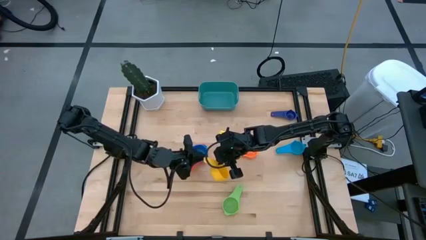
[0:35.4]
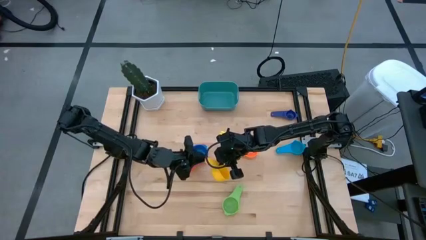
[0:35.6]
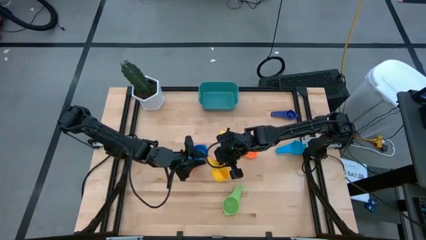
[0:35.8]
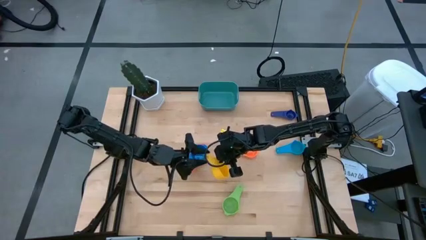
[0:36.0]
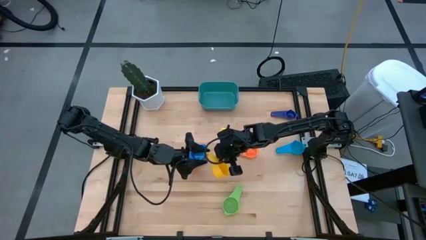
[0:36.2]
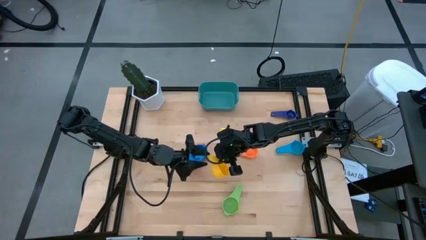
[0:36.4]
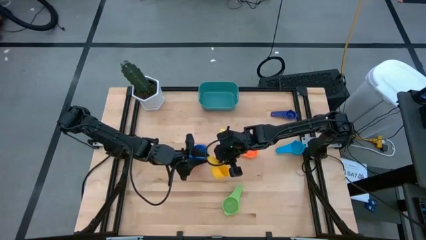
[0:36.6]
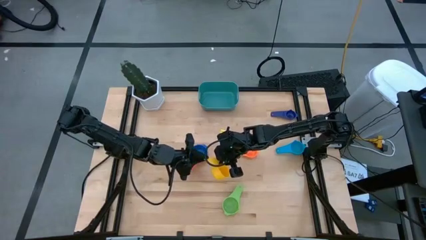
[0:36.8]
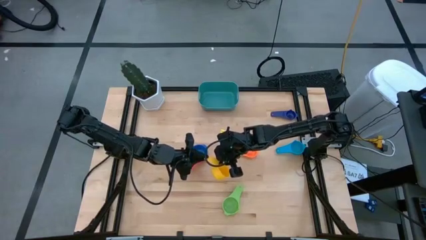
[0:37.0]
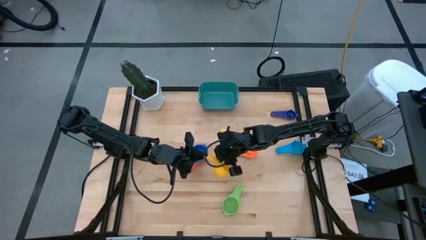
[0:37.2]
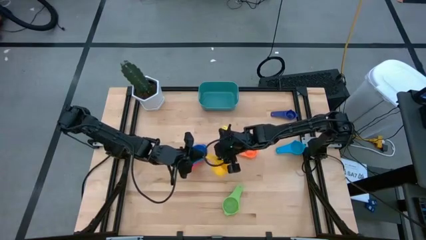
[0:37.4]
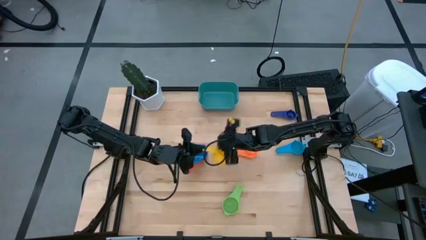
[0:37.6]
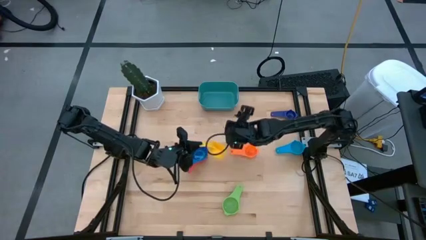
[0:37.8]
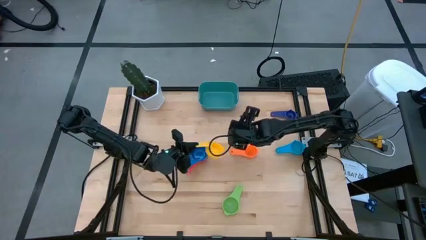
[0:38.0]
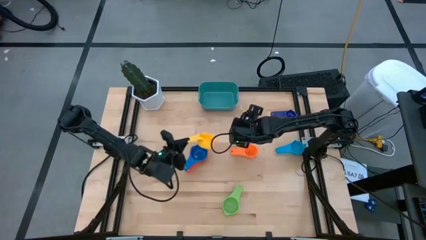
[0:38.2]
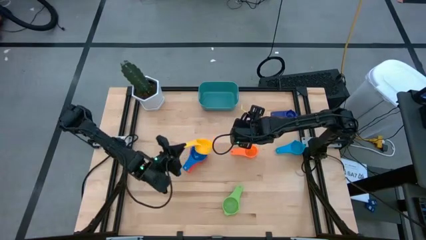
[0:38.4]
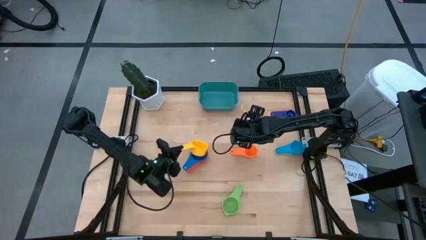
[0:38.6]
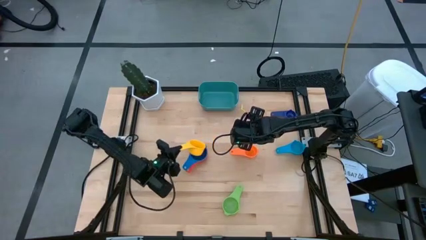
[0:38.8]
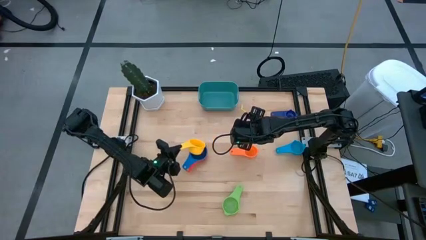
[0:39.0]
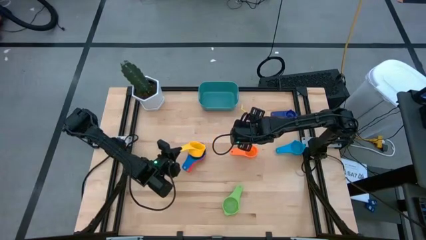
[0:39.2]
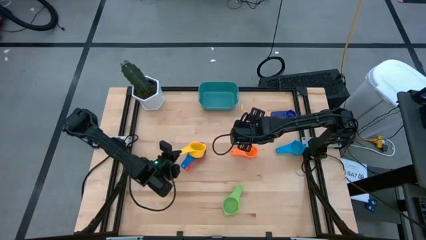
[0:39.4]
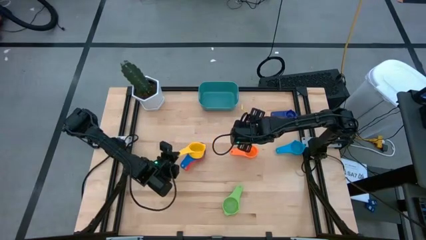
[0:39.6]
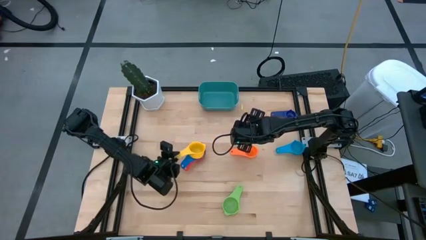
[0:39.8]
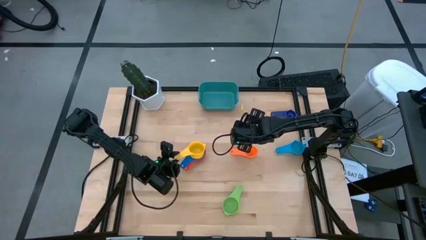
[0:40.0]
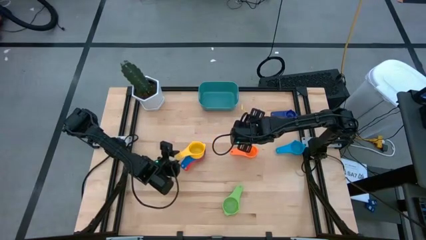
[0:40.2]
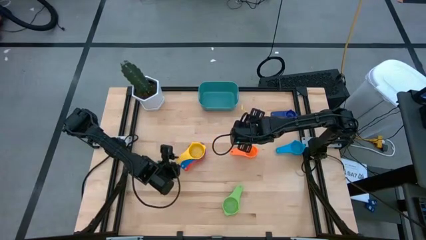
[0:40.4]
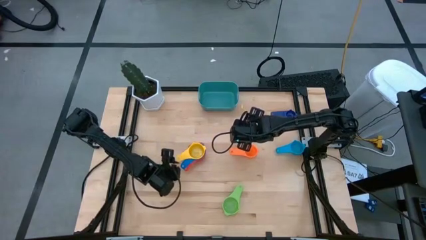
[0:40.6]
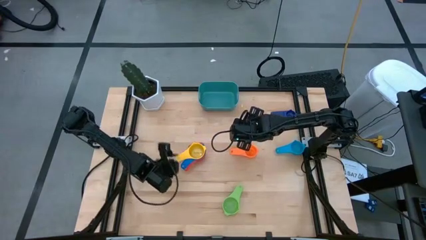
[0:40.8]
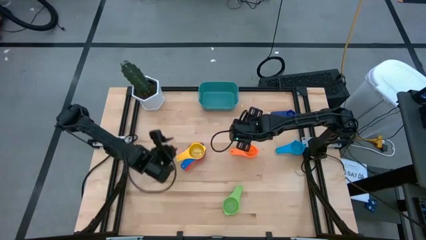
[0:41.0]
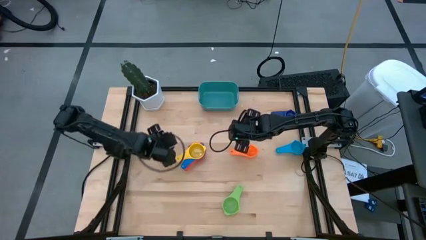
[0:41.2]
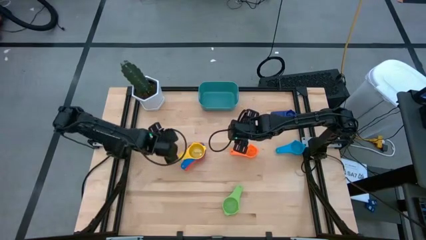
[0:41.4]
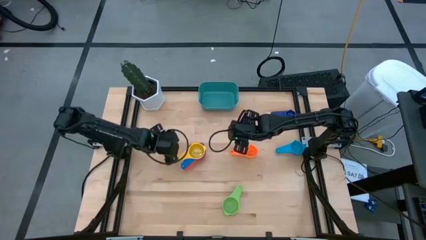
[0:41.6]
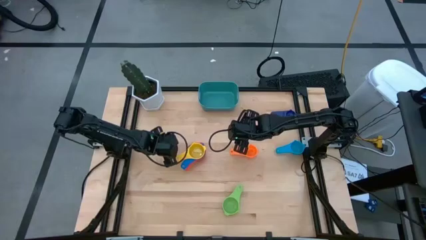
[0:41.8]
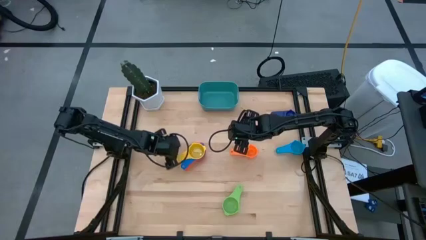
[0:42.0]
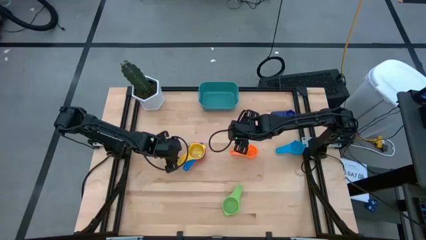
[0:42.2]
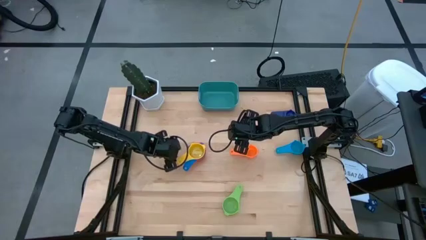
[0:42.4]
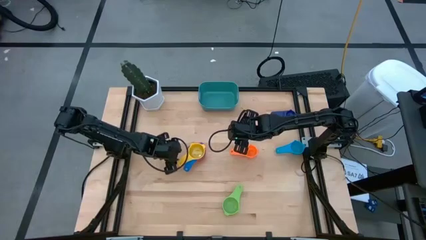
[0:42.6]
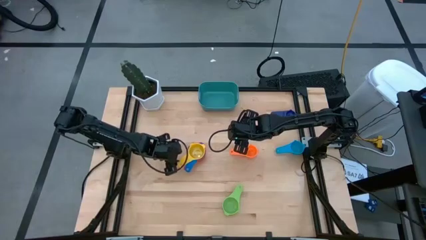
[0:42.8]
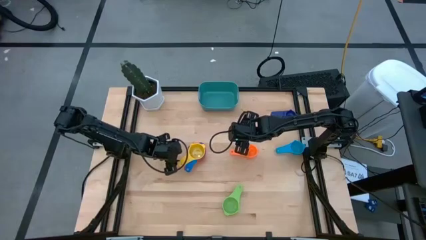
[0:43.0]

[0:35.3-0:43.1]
Task: Nest measuring cups in basket
Stack the yellow measuring cup on the blue measuring cup

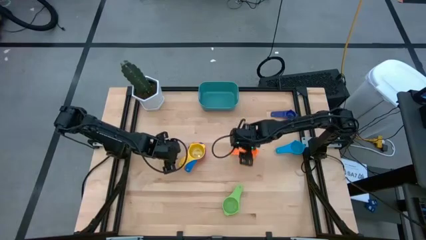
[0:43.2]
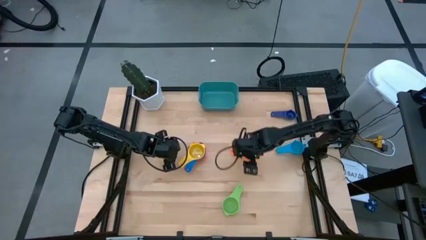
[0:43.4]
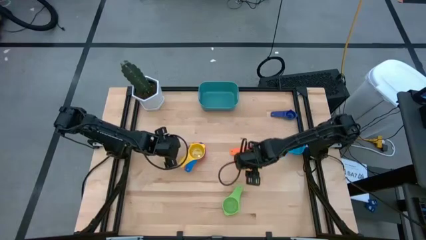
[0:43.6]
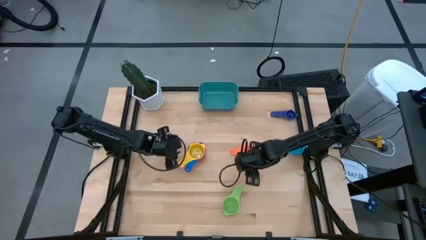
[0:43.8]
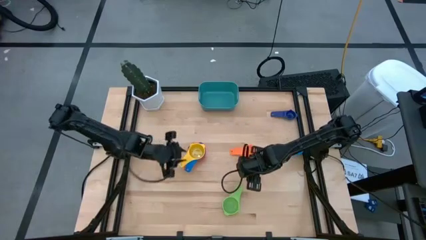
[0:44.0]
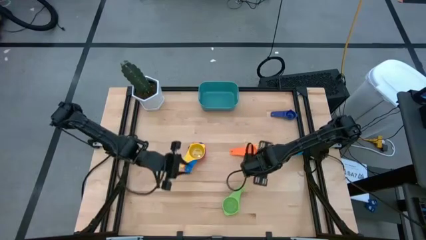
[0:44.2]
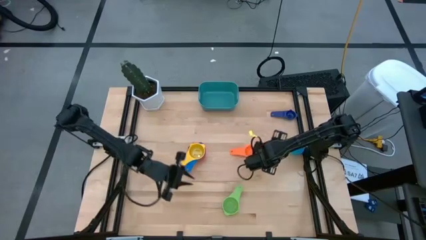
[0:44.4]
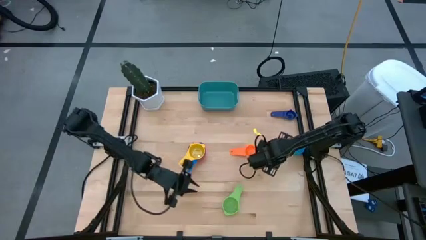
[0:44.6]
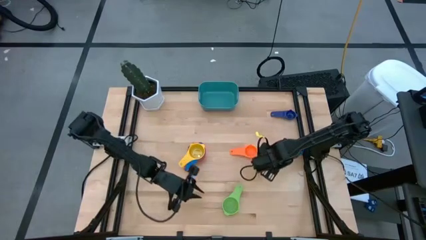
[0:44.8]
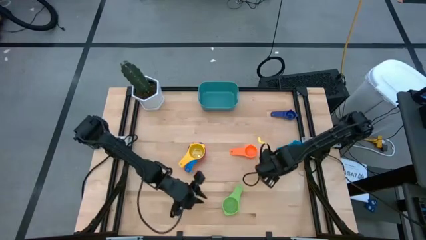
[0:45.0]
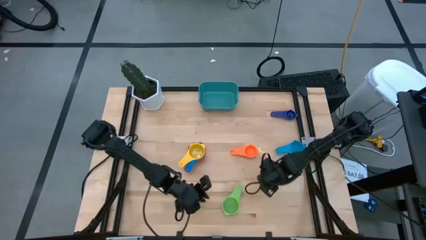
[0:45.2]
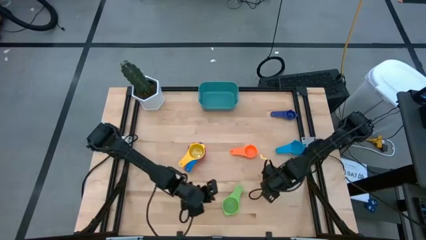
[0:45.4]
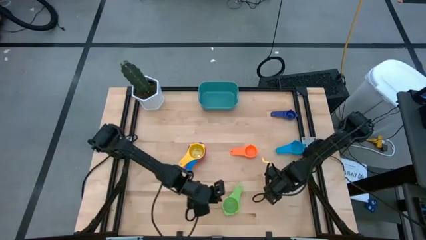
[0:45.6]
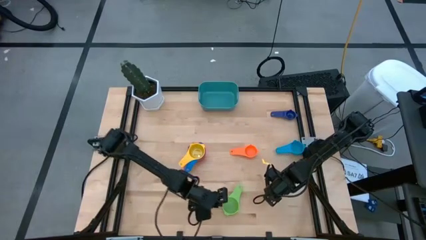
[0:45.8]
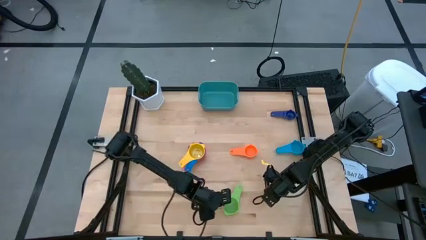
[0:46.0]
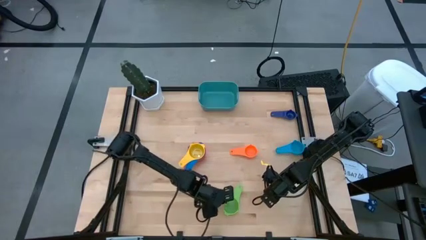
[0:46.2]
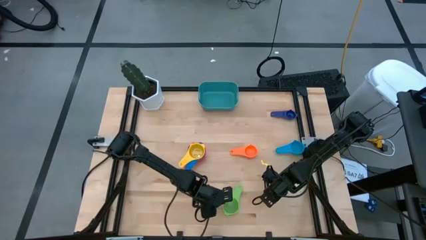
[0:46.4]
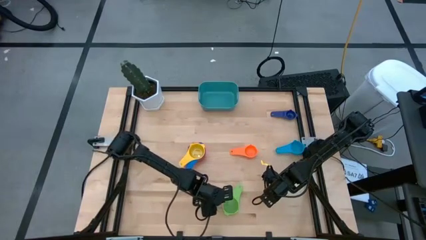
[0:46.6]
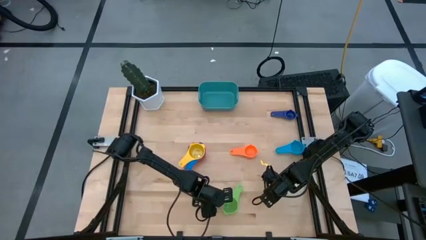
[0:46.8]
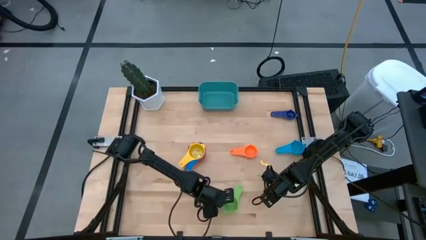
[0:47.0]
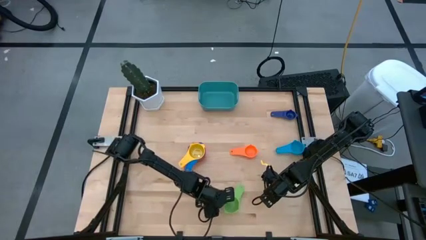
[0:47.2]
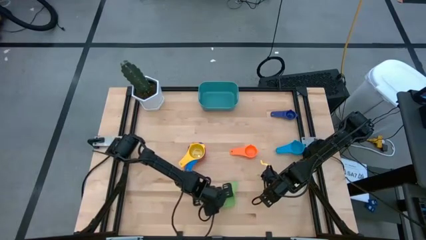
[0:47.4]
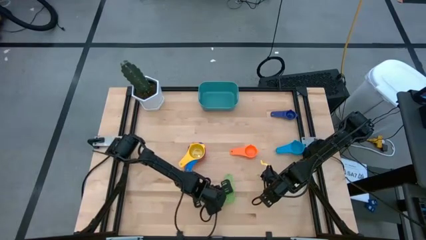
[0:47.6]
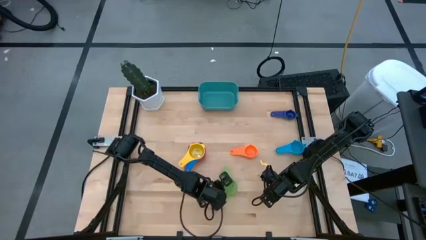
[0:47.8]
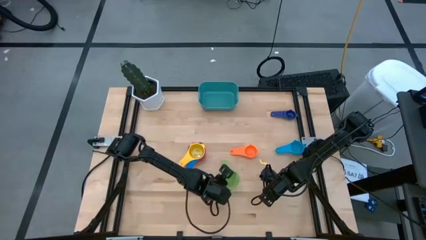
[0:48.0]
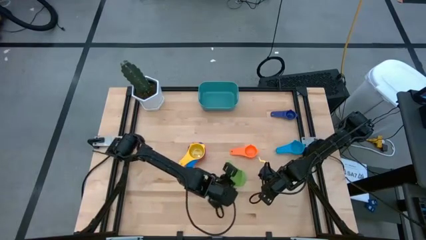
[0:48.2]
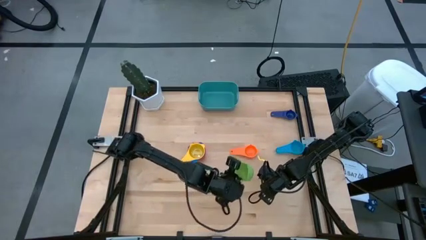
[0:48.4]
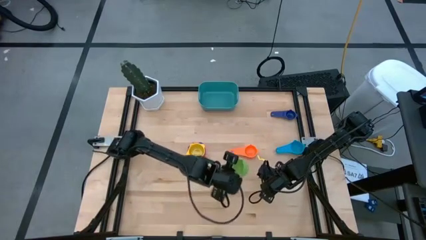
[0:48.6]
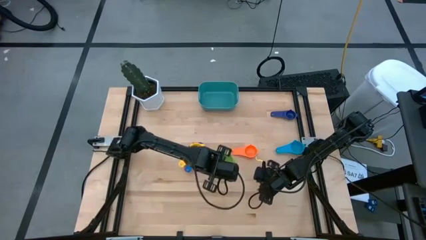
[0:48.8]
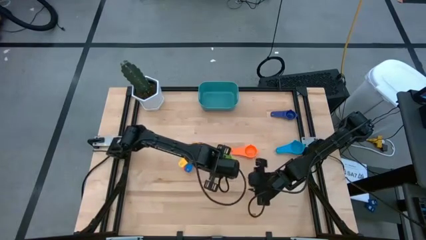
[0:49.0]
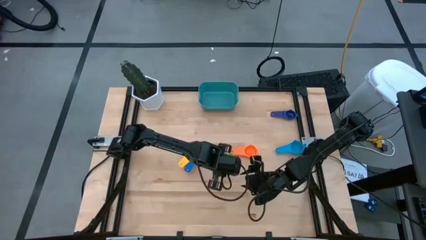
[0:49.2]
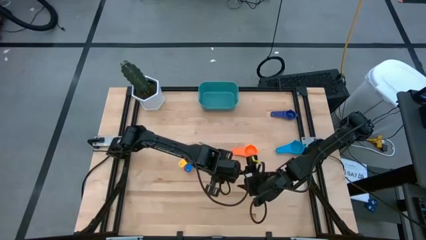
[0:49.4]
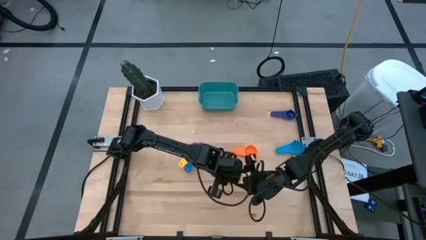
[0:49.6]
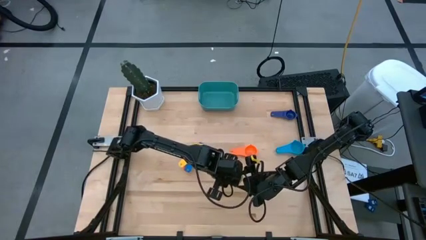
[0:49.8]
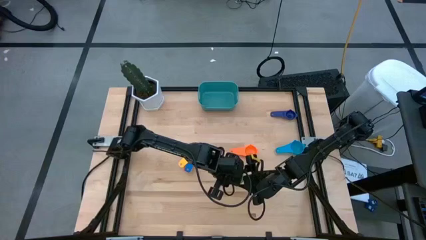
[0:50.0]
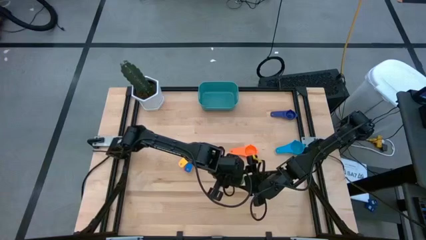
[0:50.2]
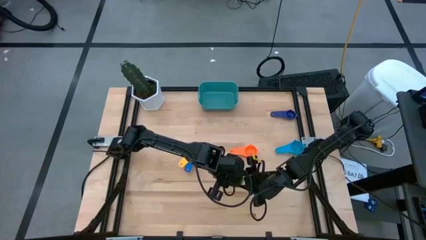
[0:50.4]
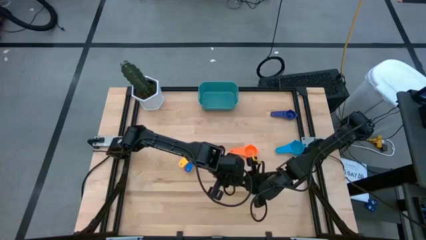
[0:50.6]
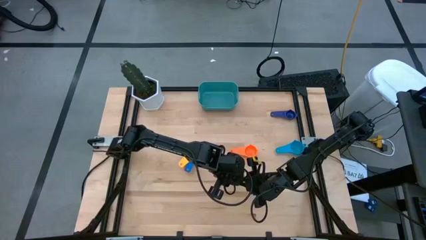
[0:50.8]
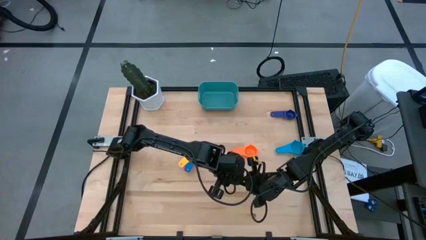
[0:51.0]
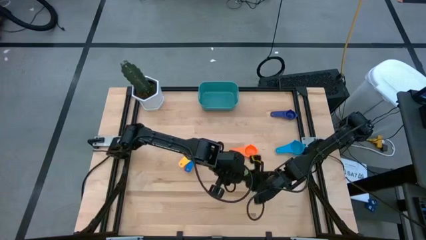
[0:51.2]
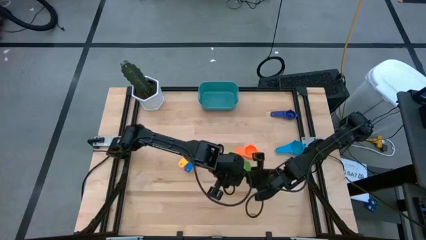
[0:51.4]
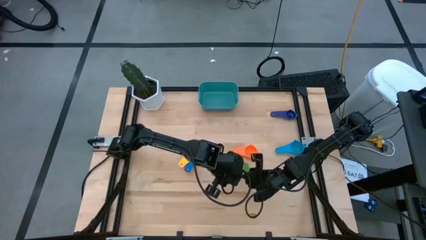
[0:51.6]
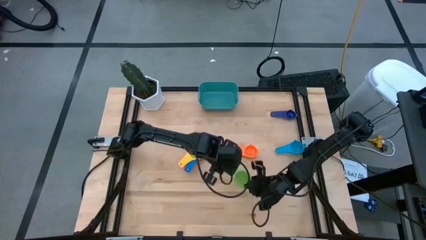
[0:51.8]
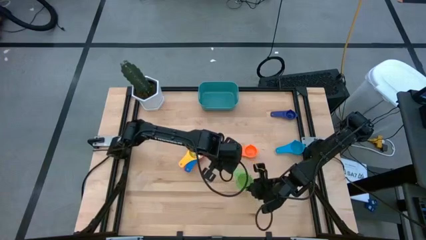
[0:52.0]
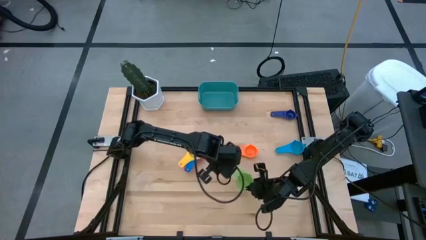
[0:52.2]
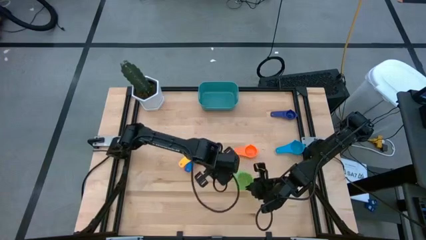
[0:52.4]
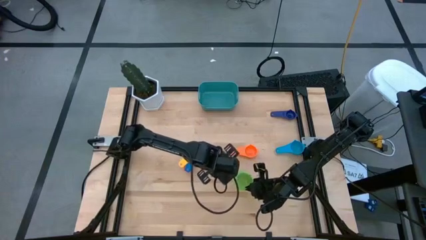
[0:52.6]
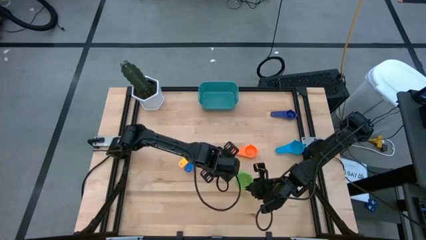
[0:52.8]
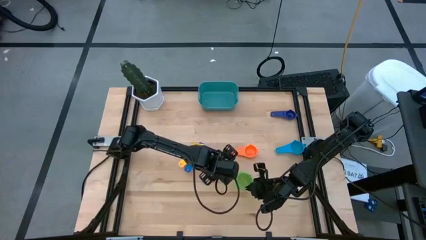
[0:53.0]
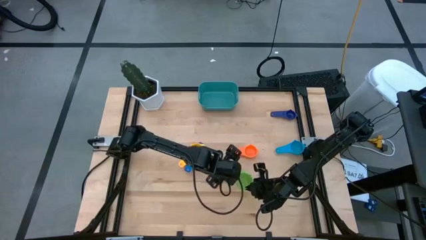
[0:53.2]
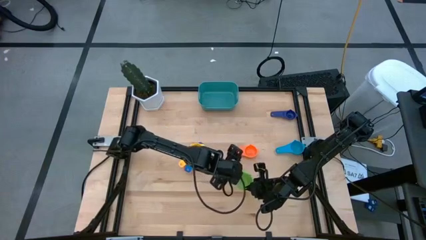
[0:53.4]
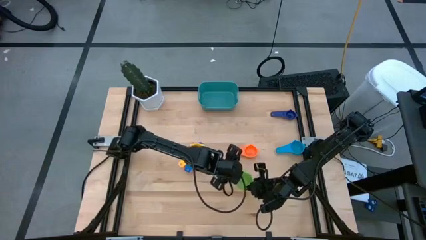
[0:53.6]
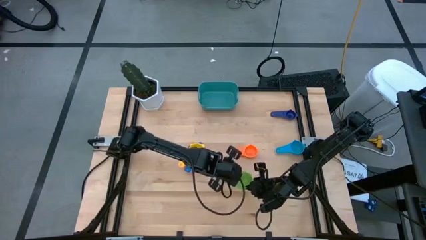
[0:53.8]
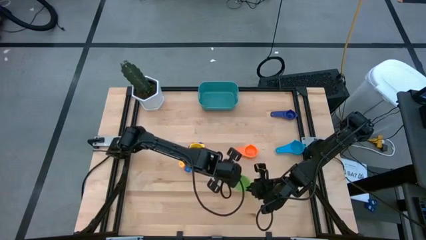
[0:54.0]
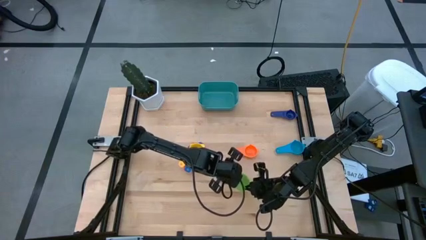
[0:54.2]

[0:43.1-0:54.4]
Stack the green measuring cup on the yellow measuring cup
